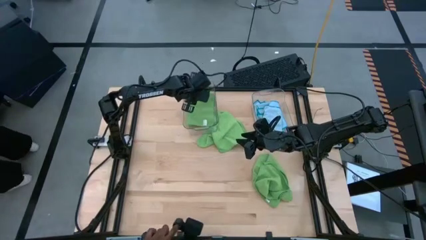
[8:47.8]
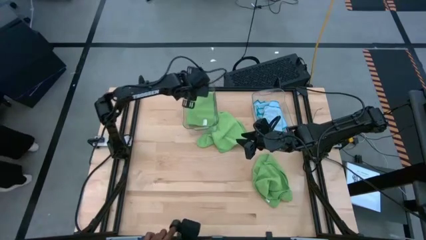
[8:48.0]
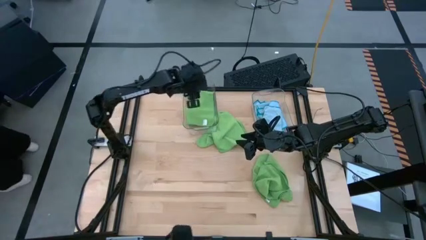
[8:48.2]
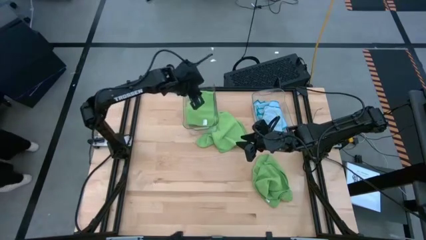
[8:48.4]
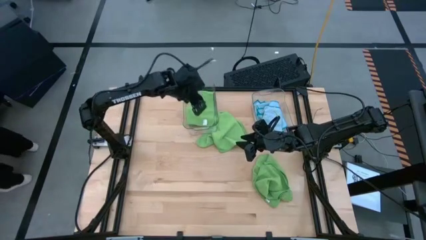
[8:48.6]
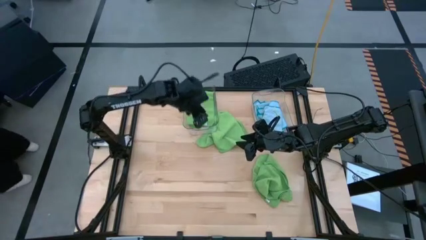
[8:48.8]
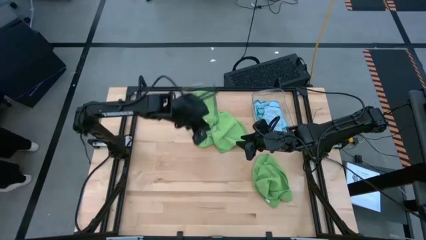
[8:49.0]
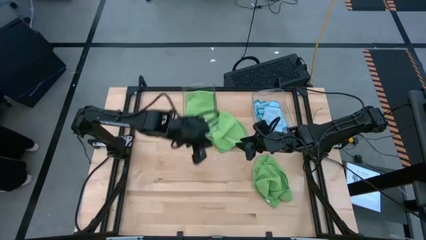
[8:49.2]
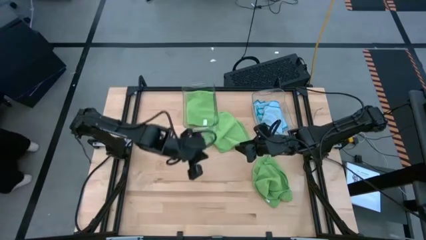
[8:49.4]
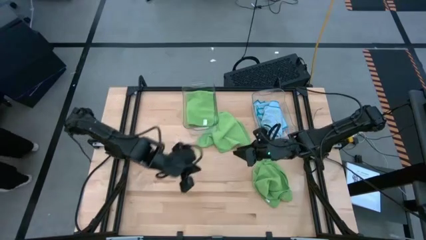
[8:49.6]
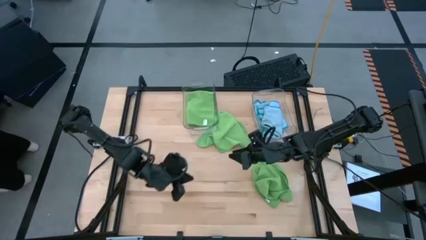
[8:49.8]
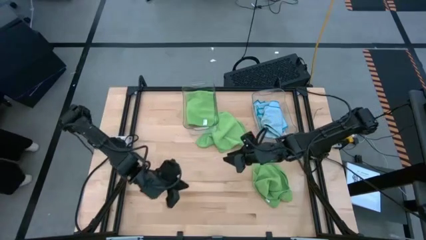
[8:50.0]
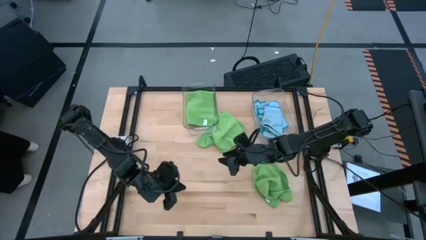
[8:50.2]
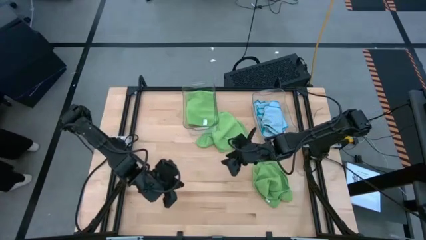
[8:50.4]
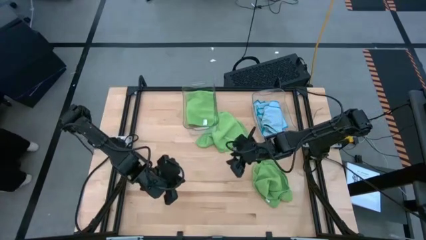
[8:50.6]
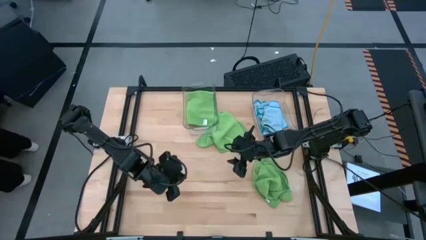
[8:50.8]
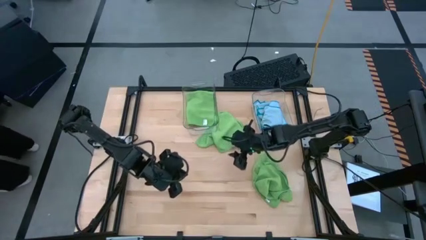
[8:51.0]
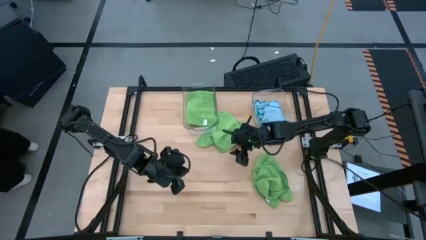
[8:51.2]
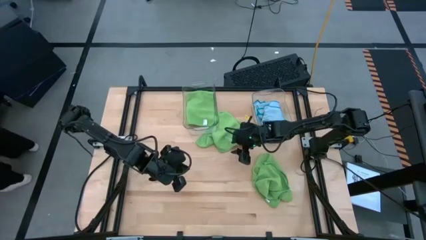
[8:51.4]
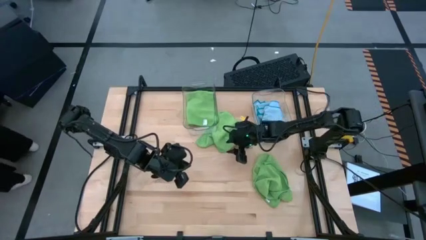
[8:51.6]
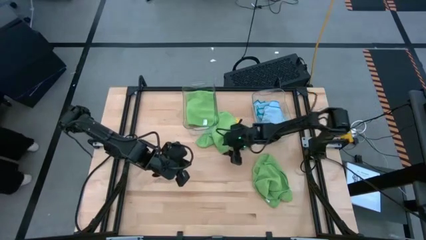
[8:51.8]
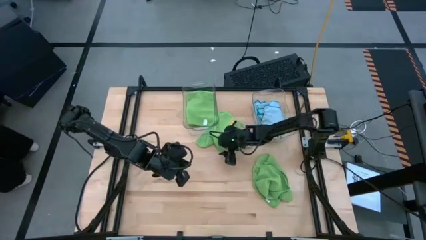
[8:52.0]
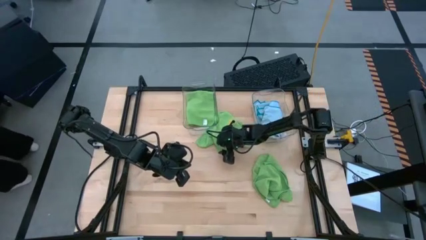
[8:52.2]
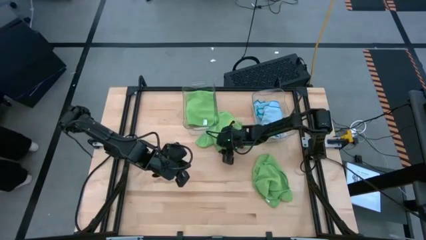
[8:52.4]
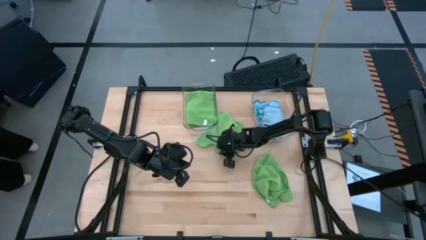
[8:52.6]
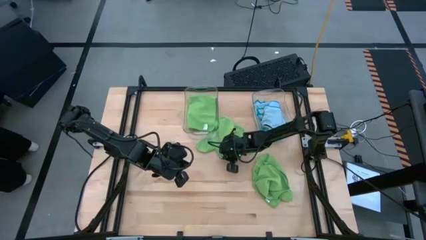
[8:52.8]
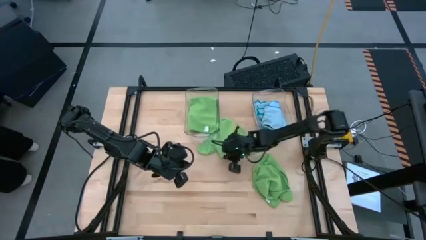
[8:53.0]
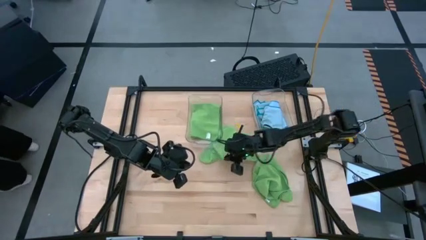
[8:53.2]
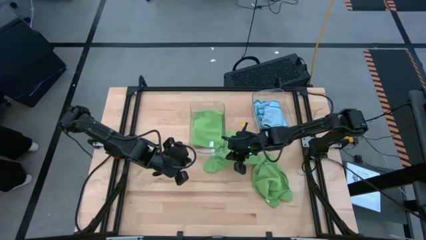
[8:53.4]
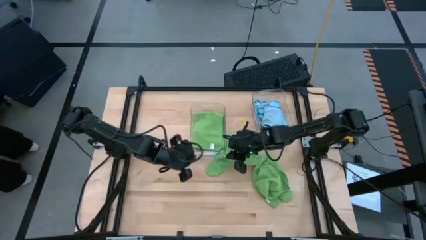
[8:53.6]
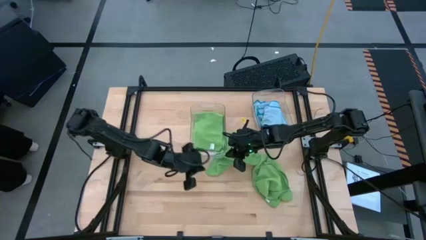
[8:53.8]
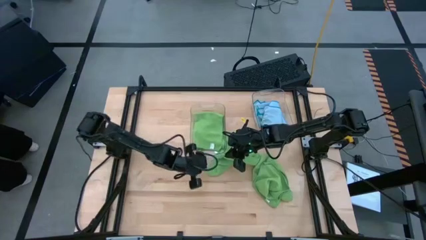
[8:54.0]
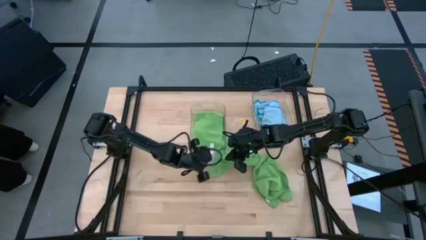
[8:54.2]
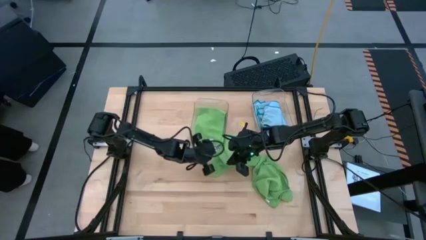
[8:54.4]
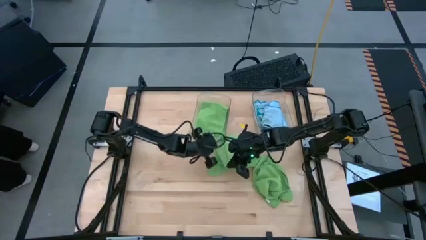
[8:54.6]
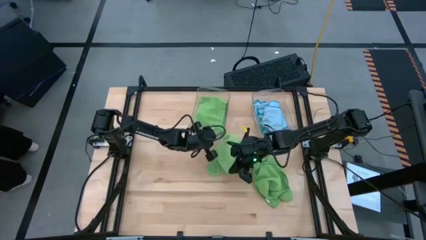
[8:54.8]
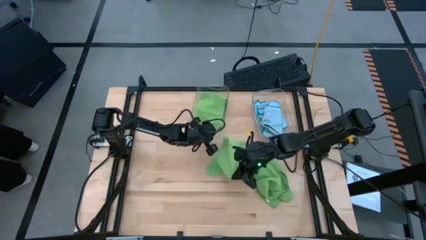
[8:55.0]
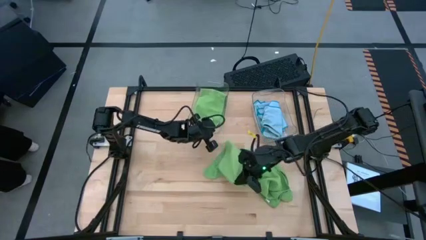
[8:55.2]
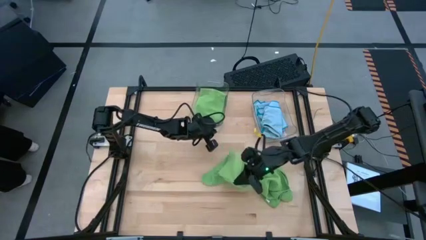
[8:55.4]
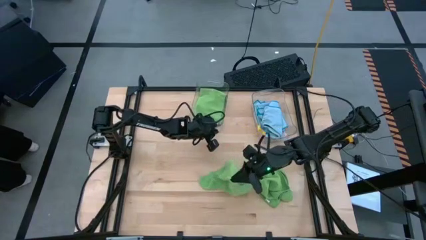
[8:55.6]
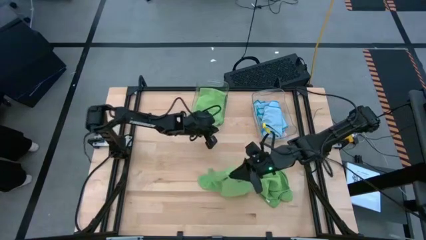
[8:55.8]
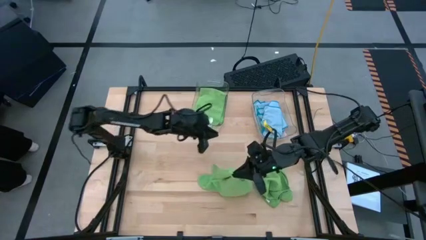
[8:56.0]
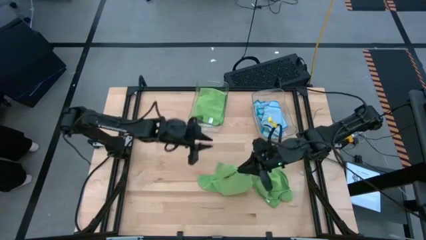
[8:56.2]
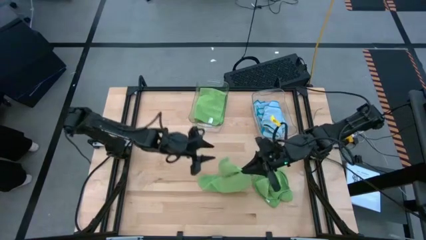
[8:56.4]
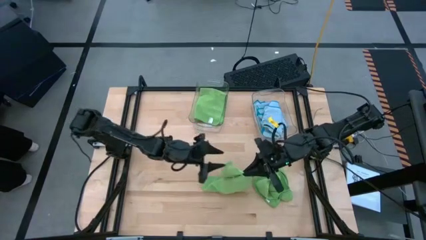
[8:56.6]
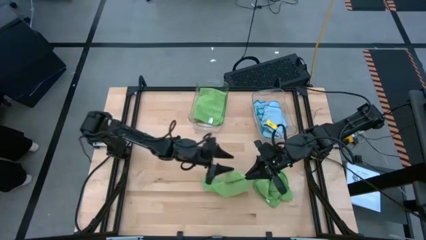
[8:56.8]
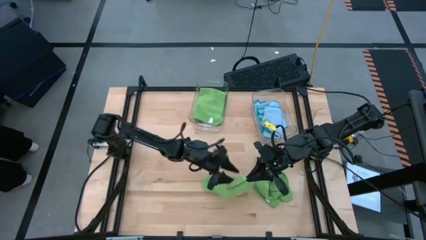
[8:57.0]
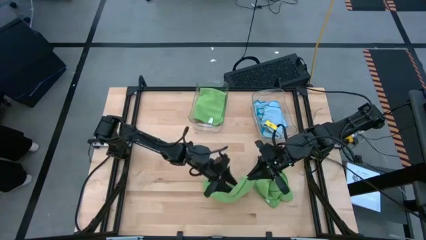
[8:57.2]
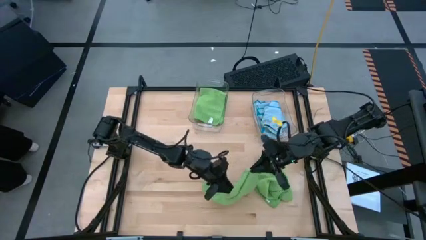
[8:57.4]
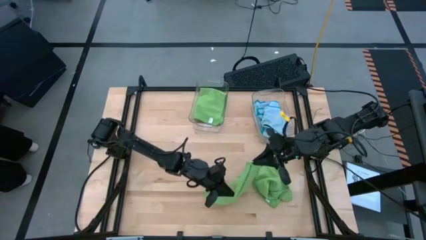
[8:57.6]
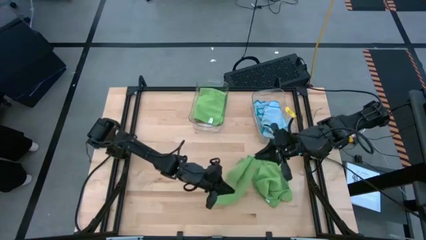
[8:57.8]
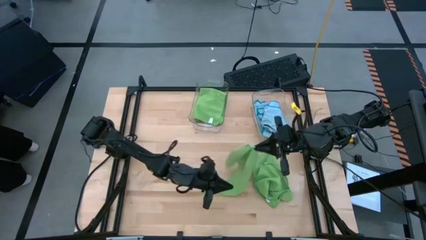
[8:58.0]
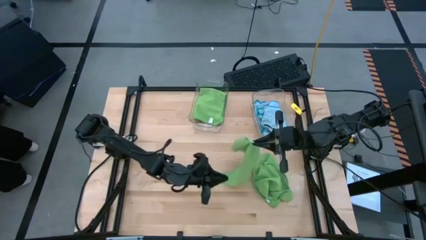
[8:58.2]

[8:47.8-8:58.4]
Task: Fold microfiber towels
Fold the top green microfiber towel

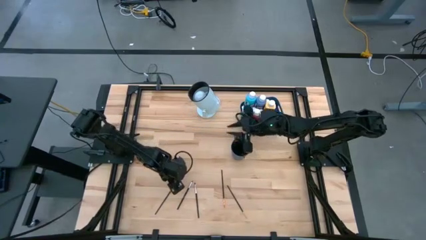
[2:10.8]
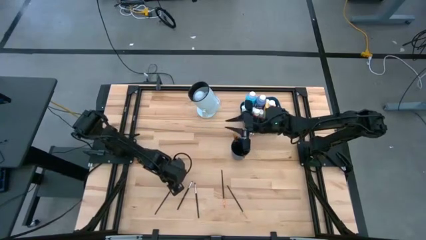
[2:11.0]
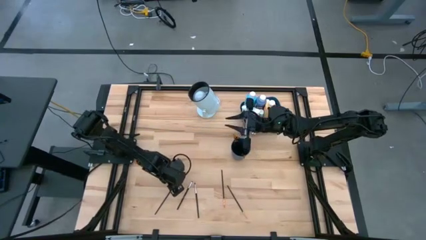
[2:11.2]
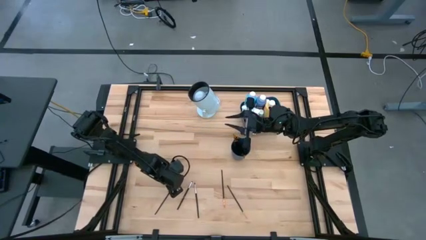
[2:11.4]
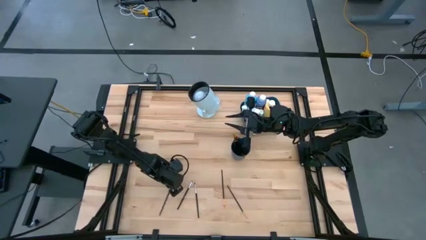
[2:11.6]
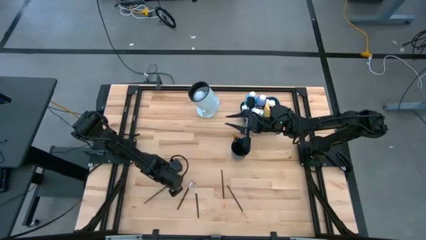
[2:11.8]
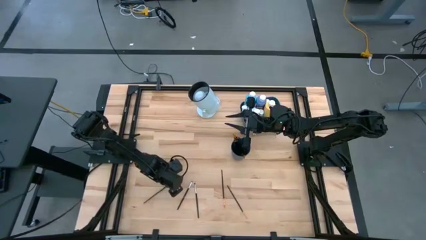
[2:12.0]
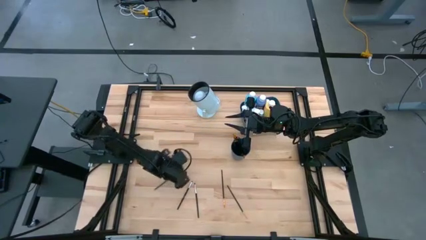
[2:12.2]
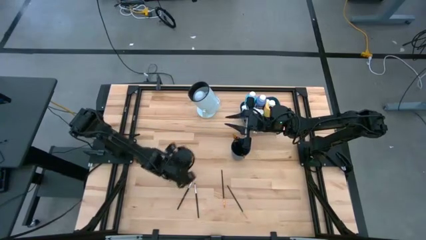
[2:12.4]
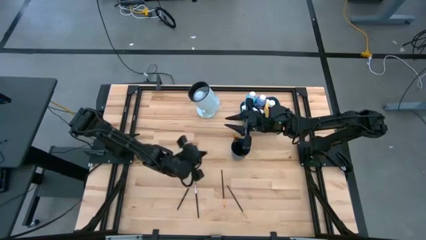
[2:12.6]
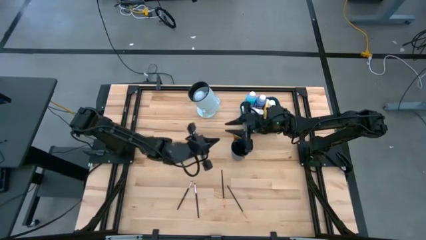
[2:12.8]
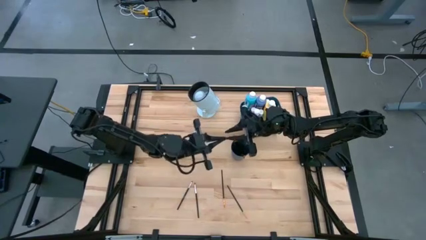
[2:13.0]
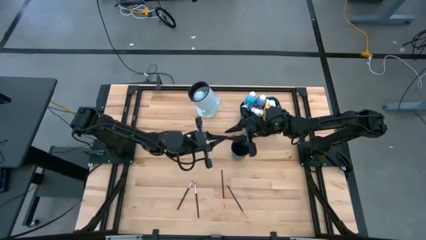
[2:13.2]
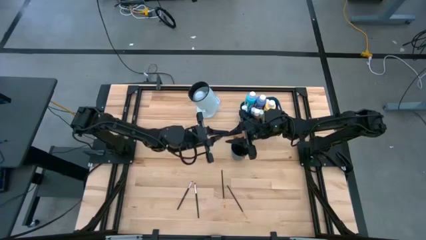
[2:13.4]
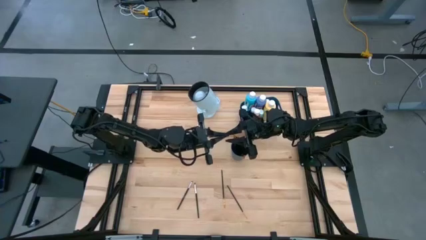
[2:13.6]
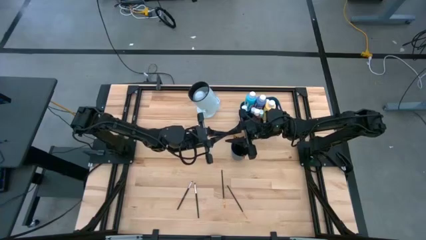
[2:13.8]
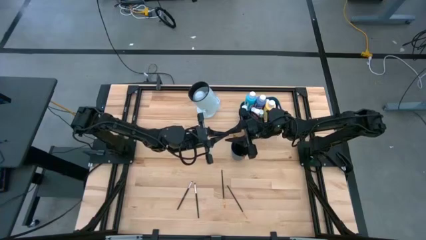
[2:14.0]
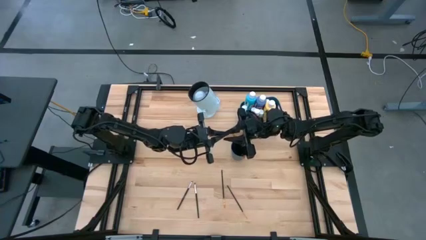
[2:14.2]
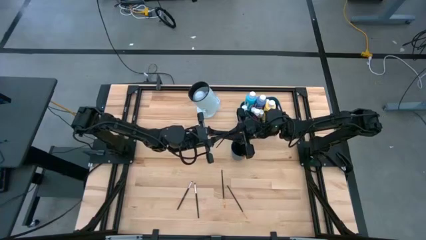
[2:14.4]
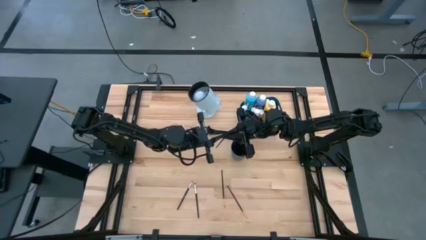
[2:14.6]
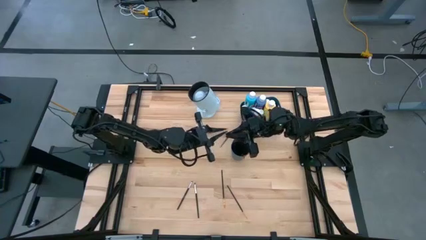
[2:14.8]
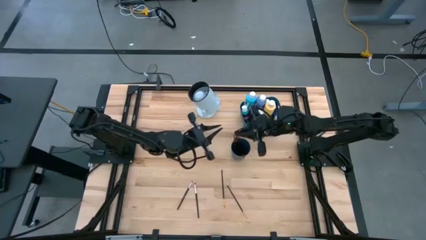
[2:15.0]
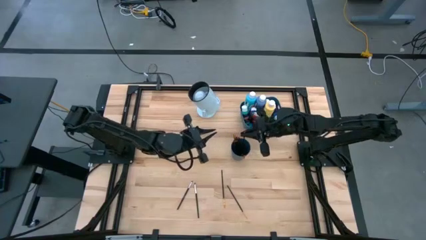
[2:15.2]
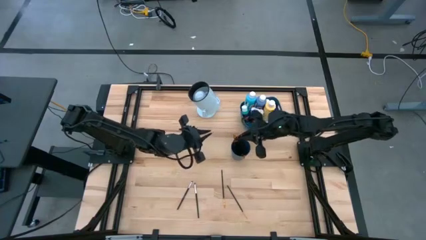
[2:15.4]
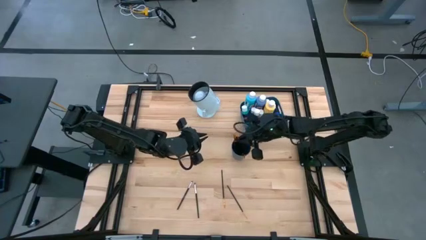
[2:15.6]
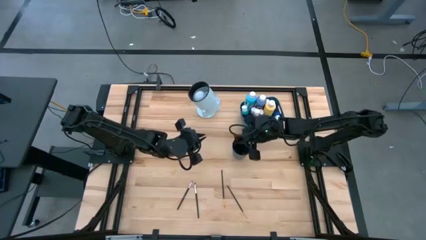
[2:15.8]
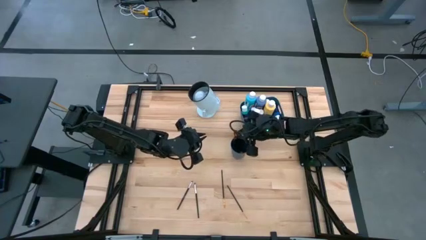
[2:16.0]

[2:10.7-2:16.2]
Task: Pick & Place Paint Supplies
Put the gold paintbrush into the blue cup
